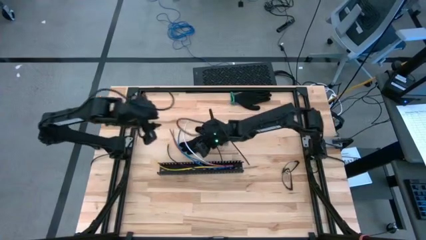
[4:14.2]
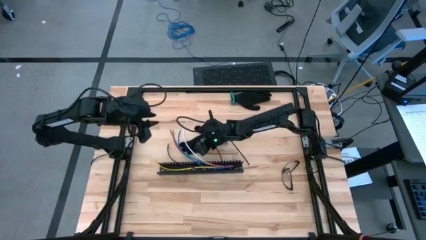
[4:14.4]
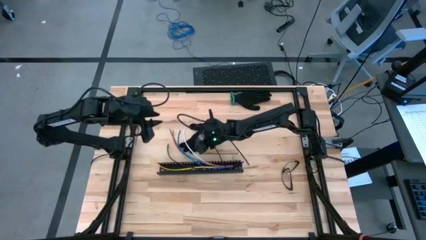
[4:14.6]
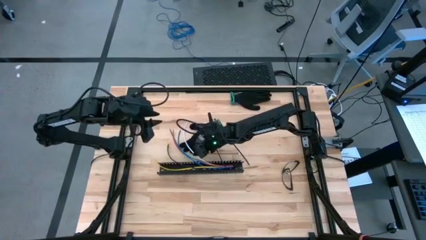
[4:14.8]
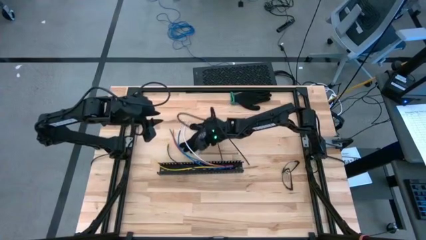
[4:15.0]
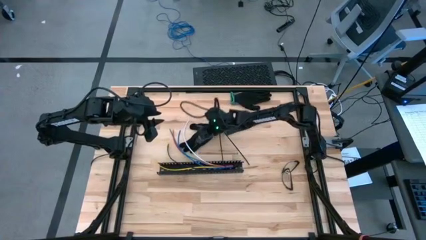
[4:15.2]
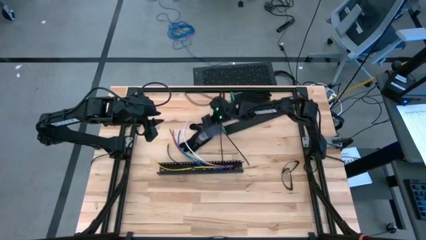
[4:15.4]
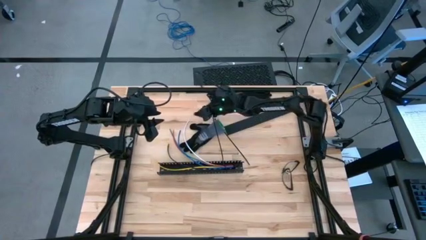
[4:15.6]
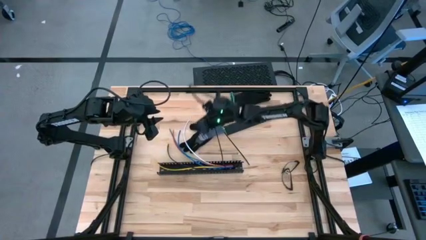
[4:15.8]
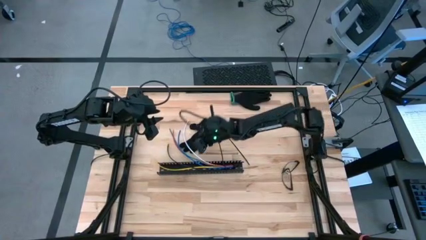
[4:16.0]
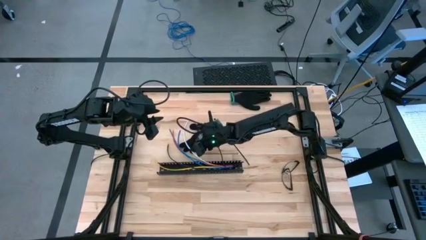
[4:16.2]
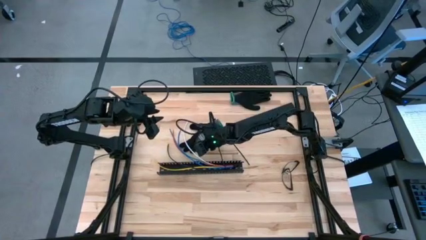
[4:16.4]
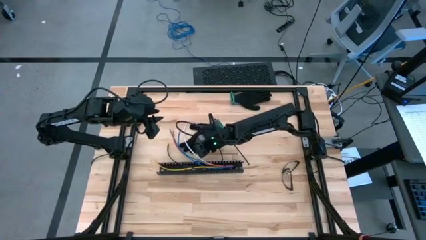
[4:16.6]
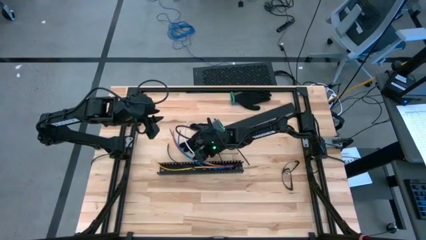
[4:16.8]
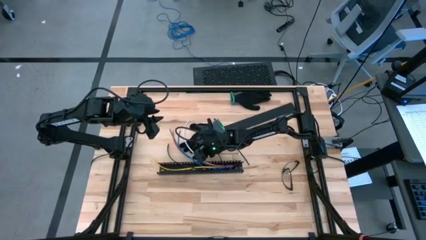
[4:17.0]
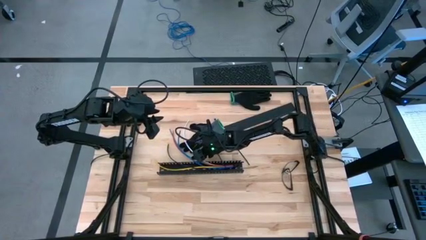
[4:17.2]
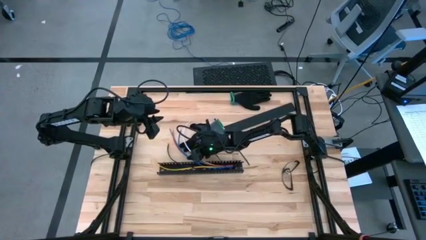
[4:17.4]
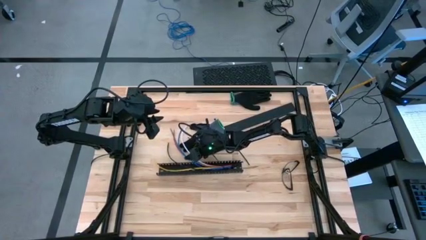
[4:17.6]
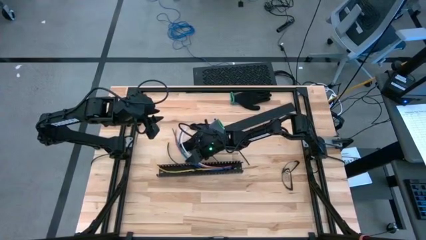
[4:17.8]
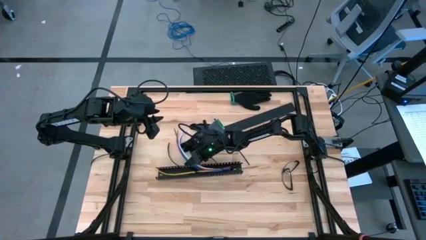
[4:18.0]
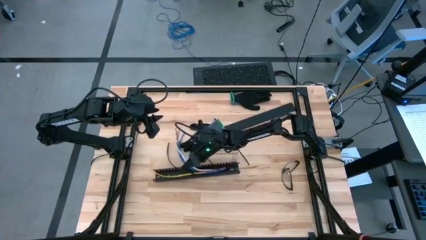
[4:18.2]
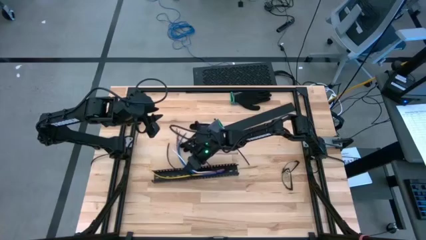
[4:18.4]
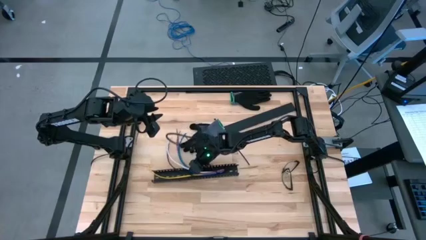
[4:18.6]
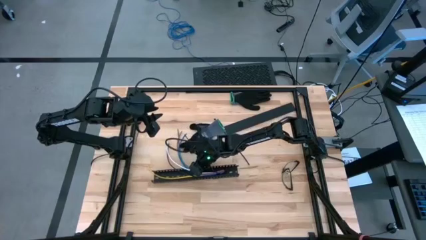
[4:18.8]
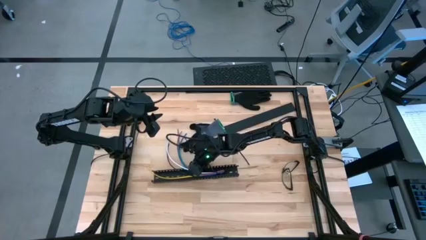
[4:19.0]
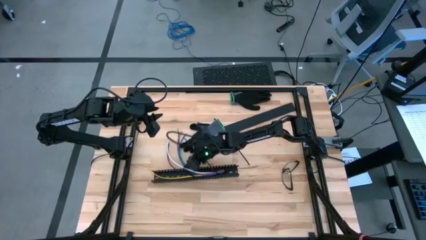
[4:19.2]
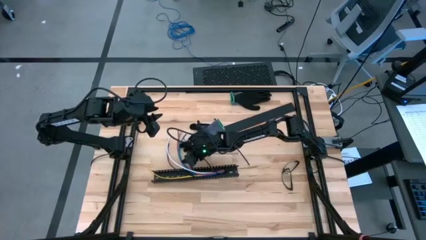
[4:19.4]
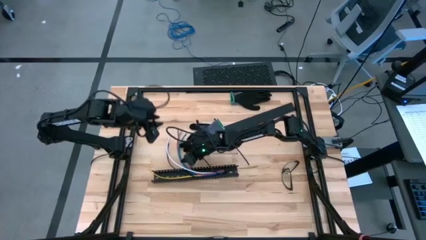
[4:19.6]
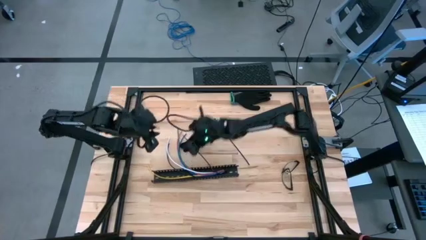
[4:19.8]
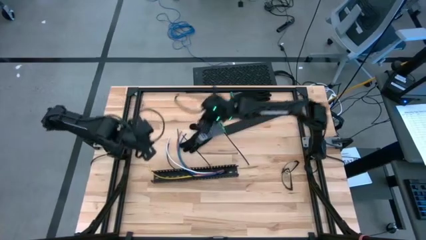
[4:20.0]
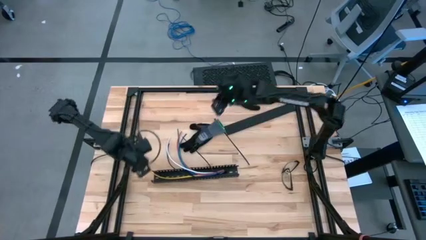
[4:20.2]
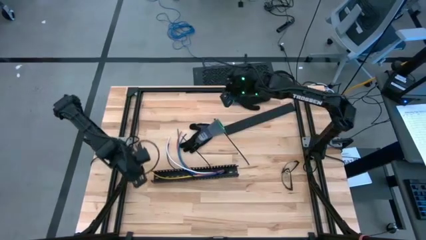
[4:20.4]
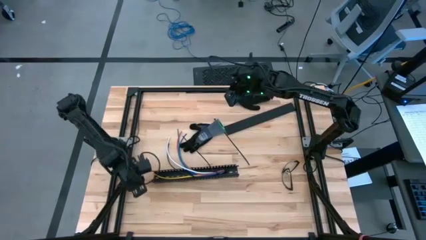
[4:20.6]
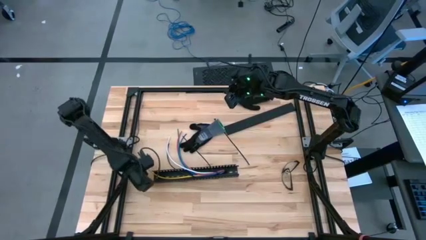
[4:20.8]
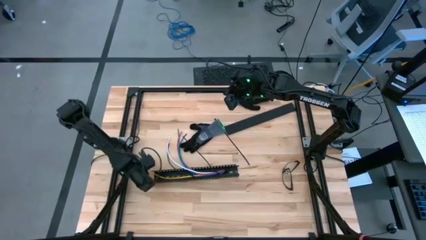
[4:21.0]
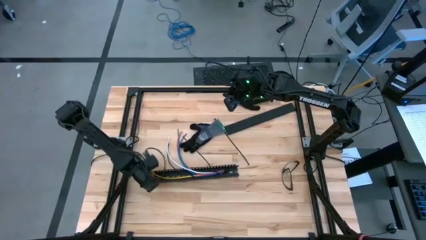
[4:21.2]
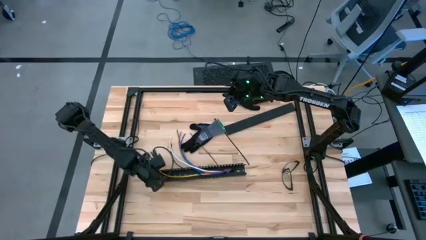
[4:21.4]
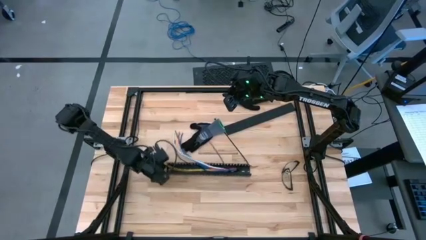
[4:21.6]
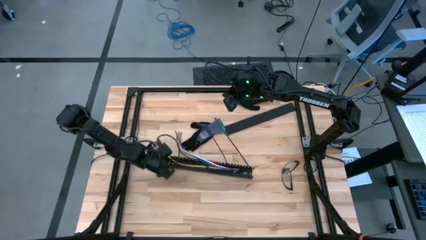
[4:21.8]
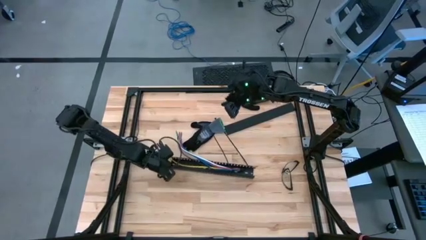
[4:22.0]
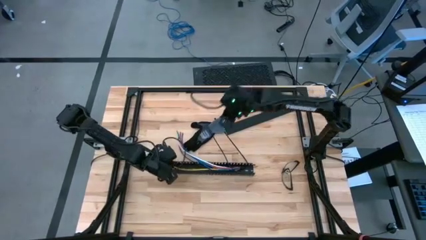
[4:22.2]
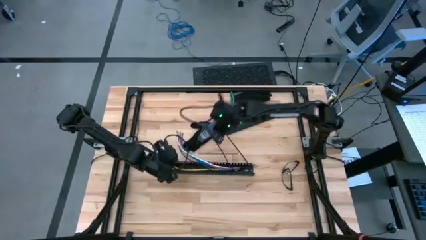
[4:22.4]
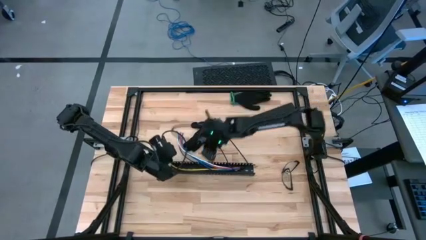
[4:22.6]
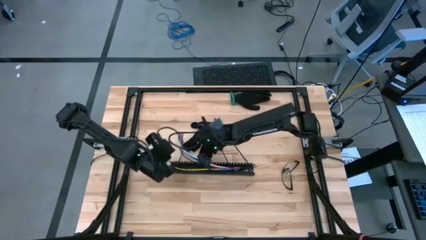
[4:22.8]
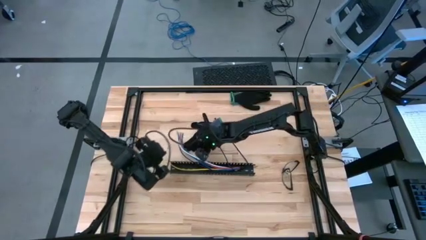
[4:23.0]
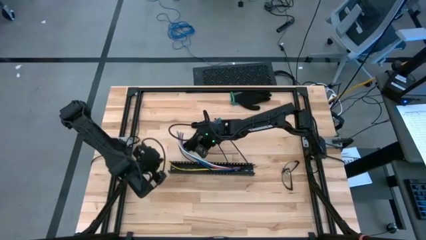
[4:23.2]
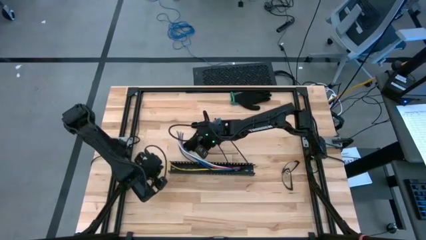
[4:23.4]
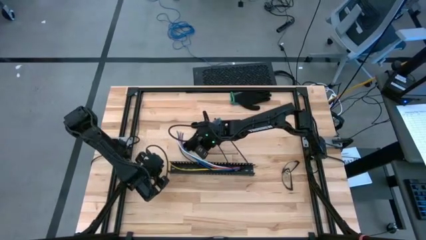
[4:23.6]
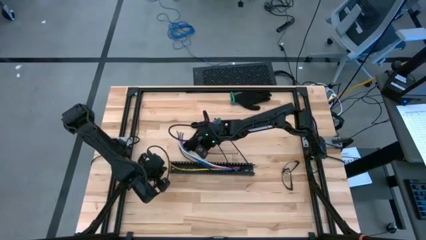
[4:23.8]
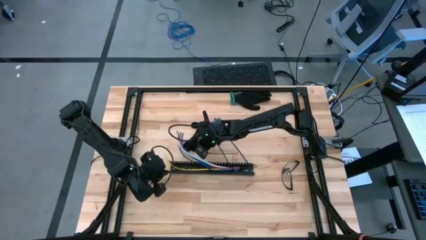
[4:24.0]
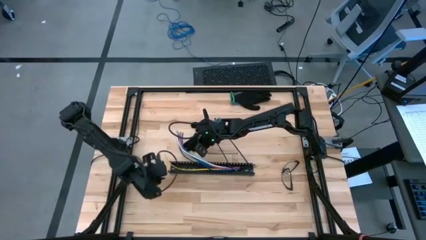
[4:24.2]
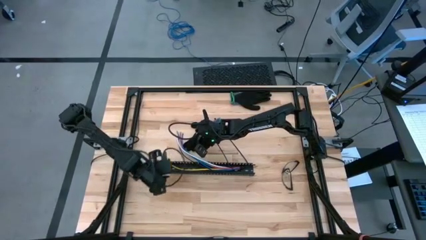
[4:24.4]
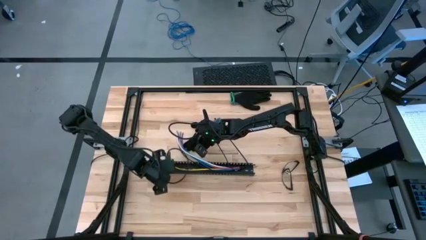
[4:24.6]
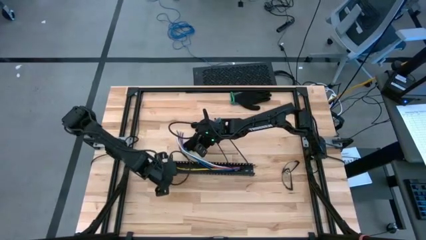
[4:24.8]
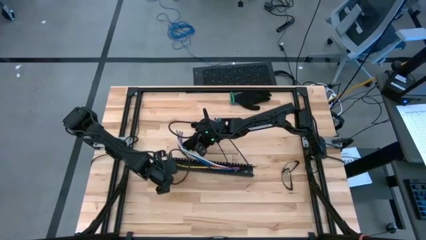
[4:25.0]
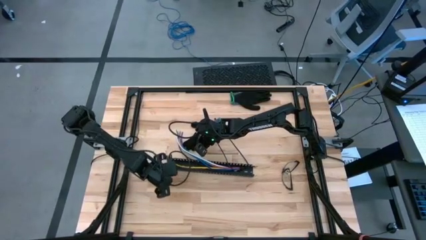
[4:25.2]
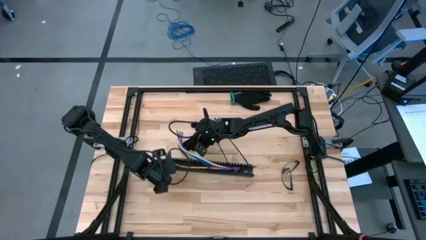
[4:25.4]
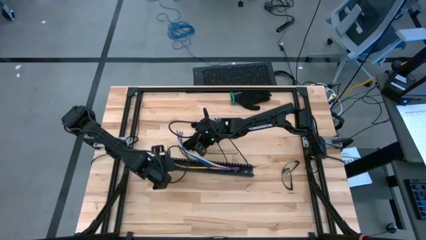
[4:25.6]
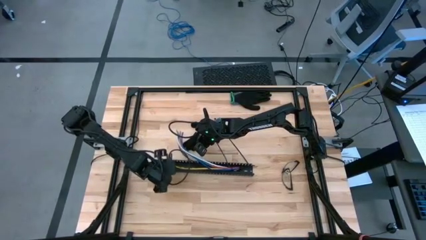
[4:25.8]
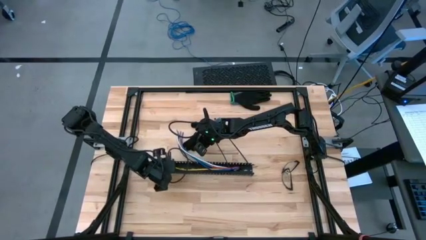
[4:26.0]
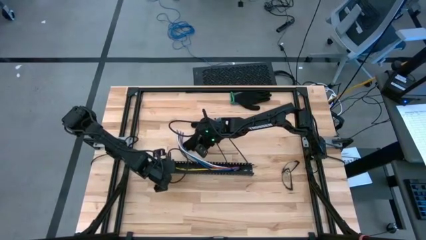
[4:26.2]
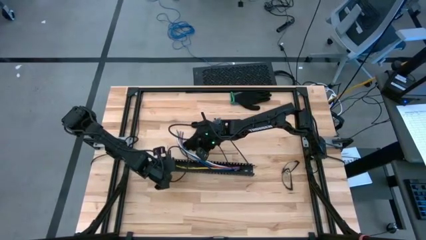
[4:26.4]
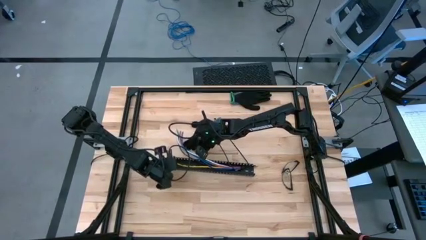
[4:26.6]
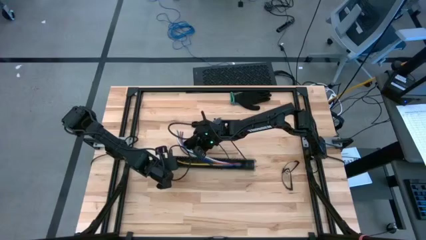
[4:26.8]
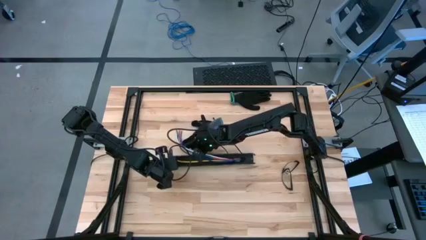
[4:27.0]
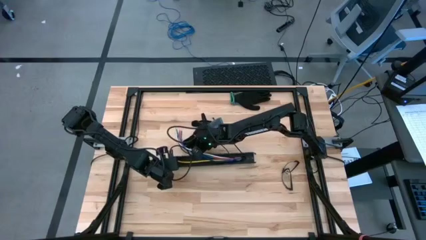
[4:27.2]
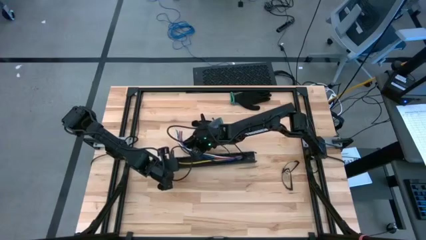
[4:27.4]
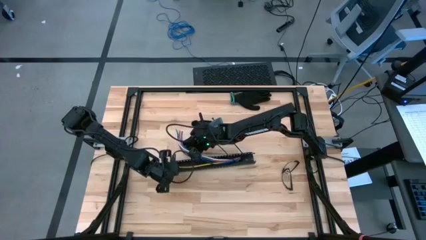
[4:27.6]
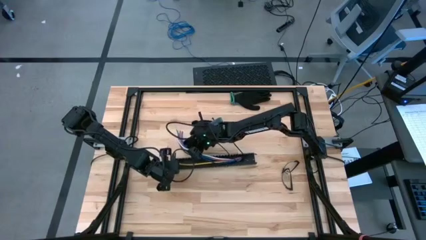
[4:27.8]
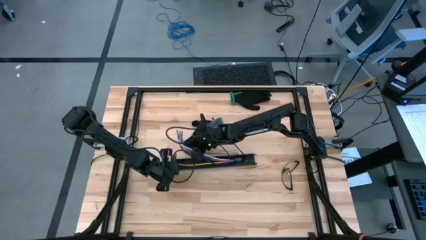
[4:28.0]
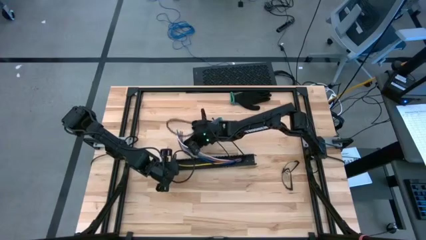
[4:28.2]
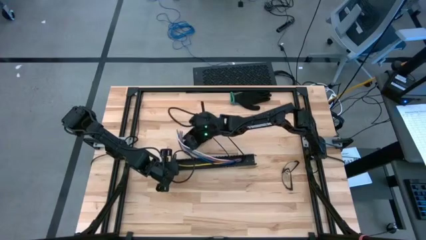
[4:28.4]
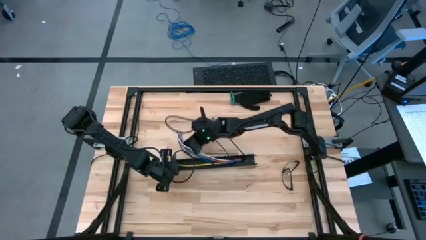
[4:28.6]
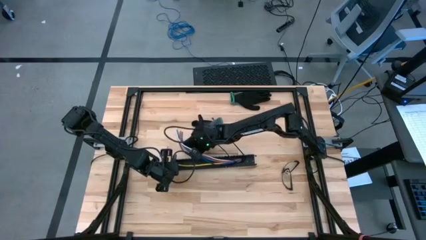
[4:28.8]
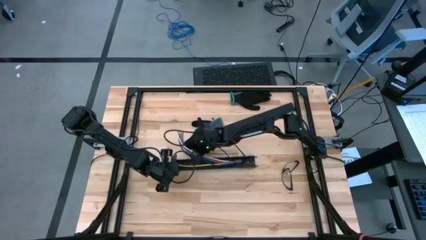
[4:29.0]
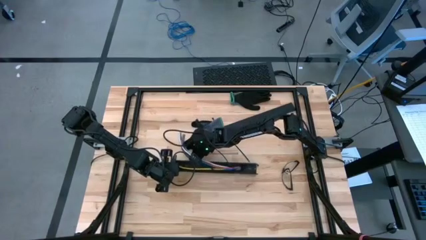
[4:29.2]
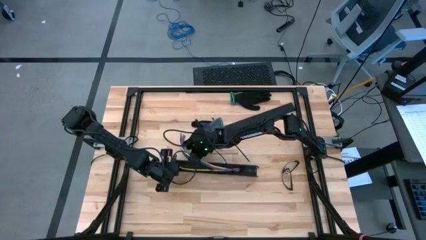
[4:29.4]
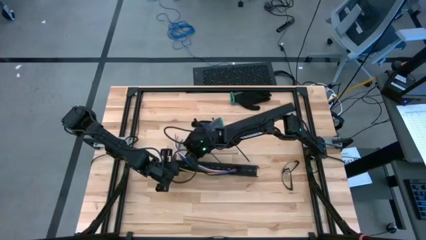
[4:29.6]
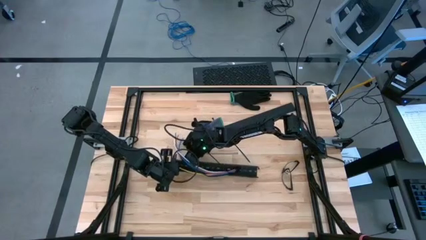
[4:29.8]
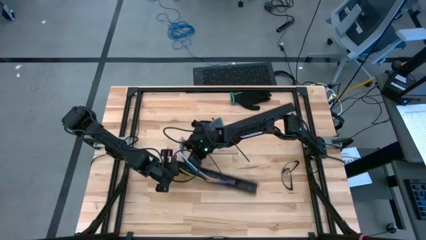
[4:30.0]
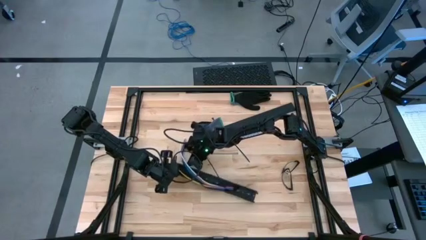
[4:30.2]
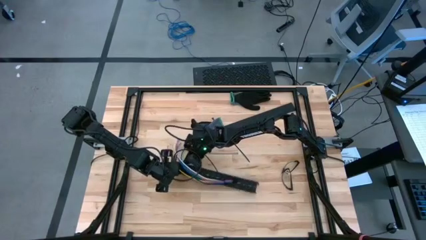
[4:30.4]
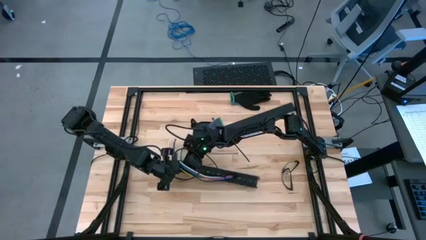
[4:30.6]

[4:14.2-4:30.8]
Task: Ziptie cables
Put the zip tied cable wires into the black cable duct
